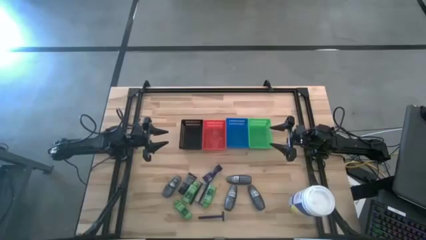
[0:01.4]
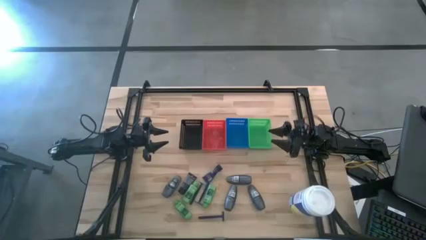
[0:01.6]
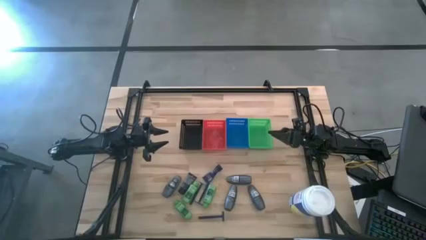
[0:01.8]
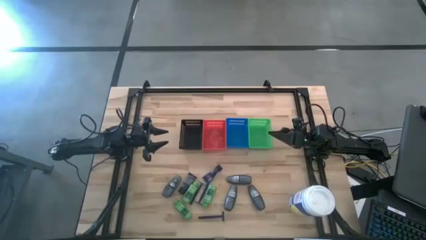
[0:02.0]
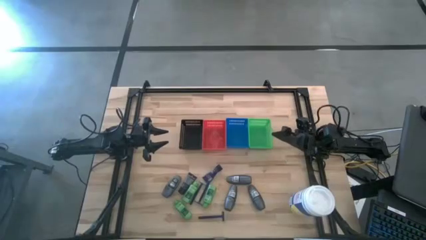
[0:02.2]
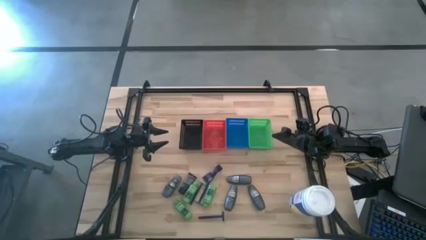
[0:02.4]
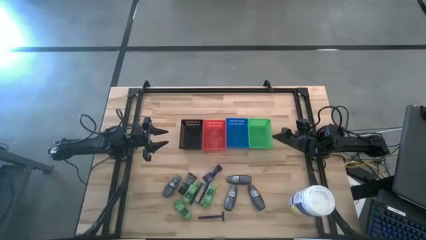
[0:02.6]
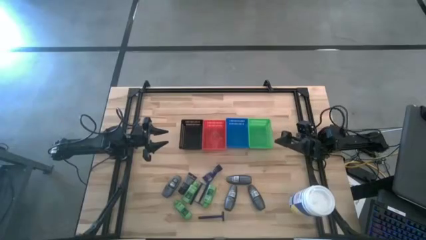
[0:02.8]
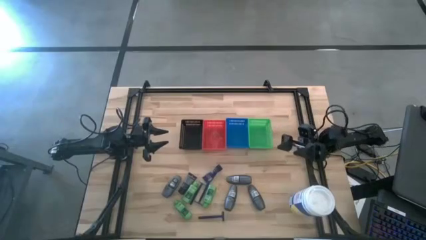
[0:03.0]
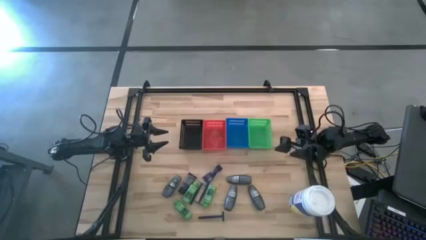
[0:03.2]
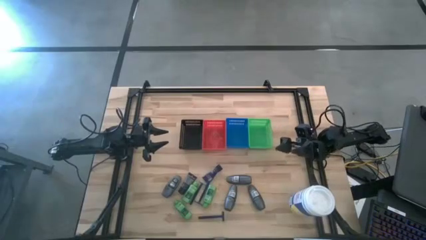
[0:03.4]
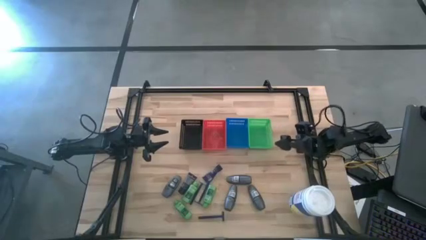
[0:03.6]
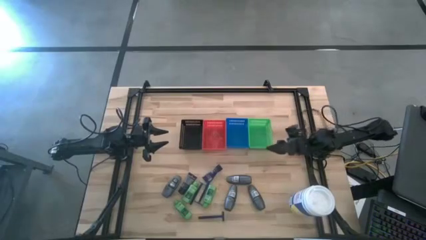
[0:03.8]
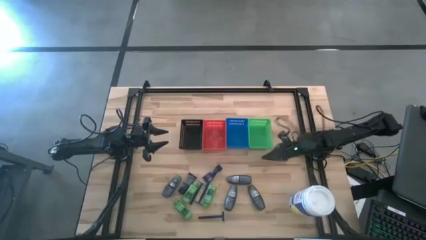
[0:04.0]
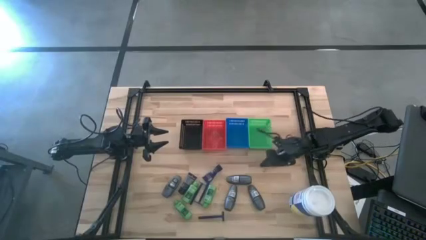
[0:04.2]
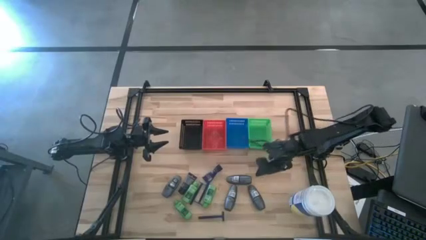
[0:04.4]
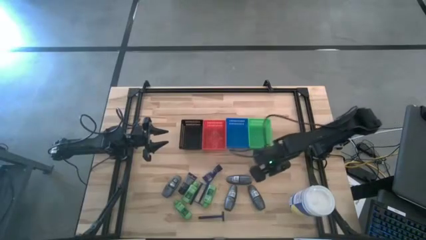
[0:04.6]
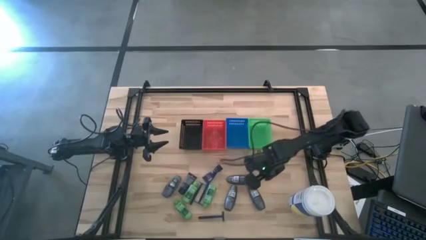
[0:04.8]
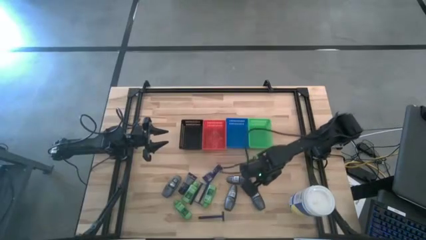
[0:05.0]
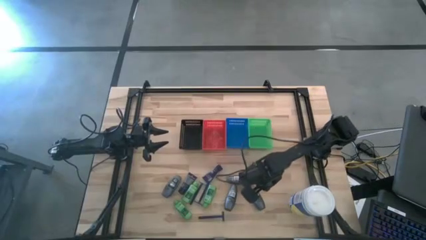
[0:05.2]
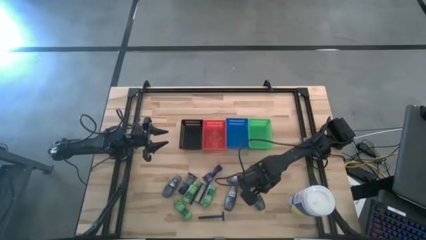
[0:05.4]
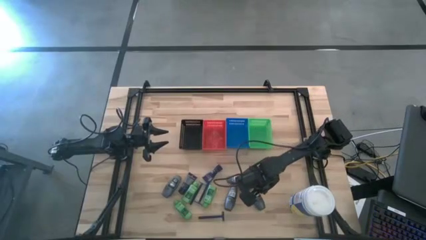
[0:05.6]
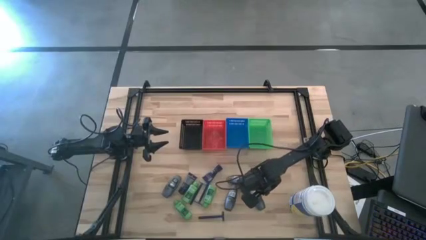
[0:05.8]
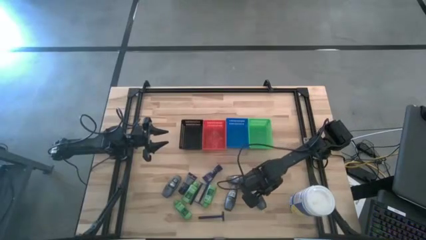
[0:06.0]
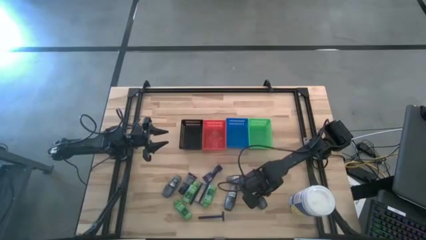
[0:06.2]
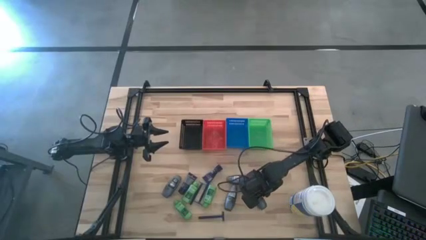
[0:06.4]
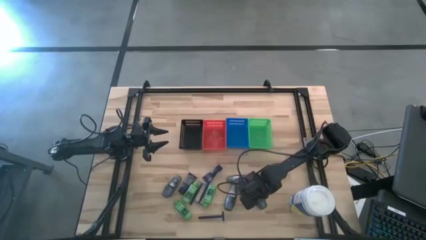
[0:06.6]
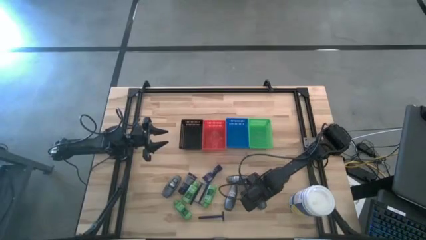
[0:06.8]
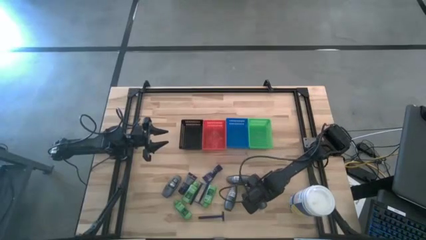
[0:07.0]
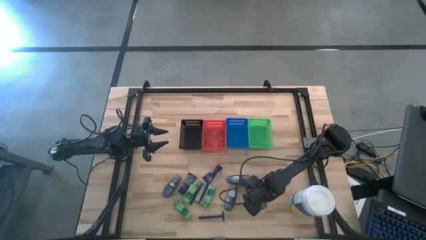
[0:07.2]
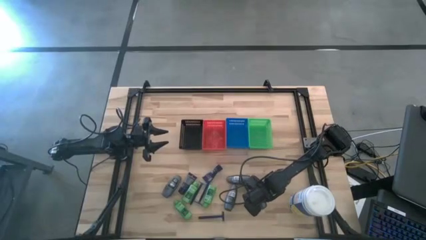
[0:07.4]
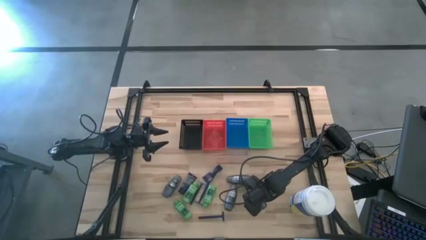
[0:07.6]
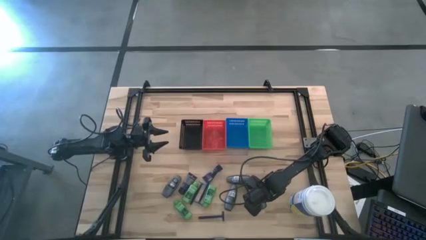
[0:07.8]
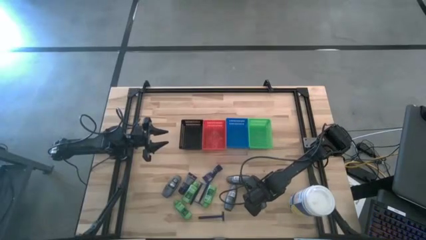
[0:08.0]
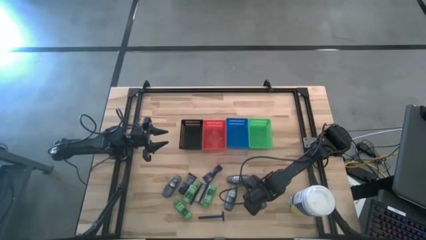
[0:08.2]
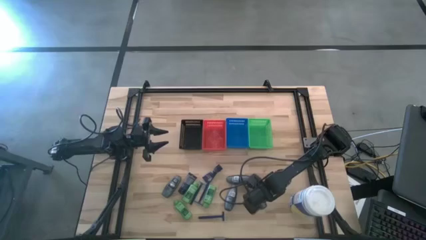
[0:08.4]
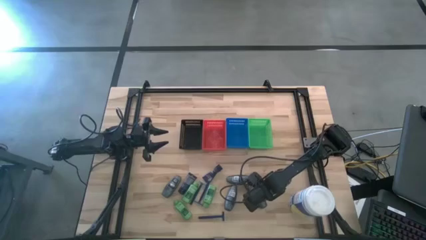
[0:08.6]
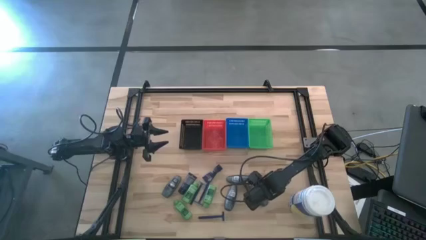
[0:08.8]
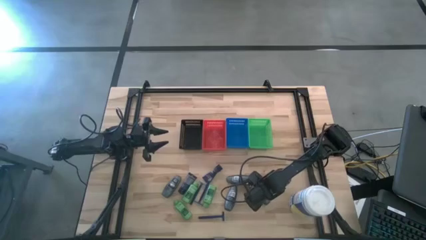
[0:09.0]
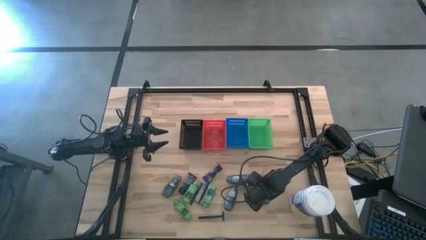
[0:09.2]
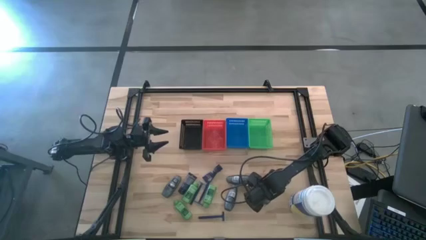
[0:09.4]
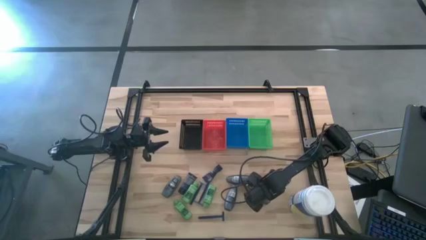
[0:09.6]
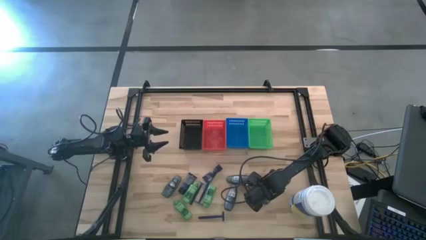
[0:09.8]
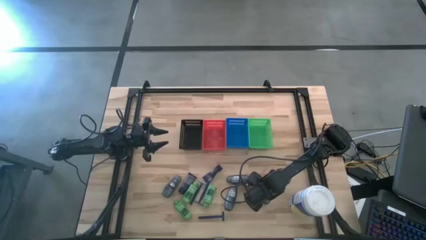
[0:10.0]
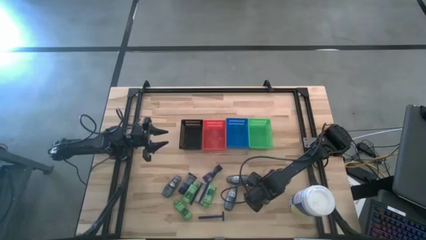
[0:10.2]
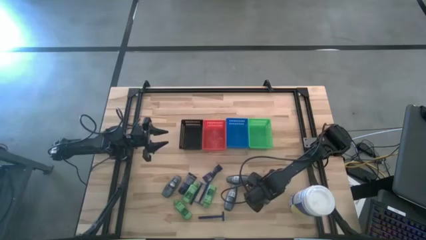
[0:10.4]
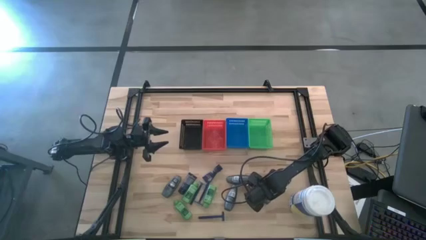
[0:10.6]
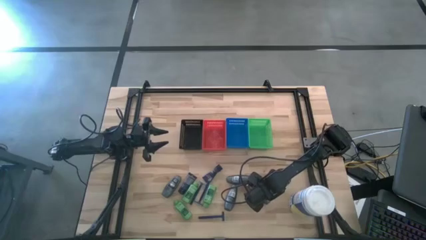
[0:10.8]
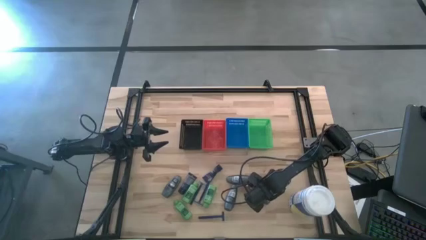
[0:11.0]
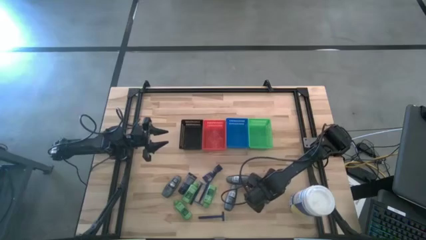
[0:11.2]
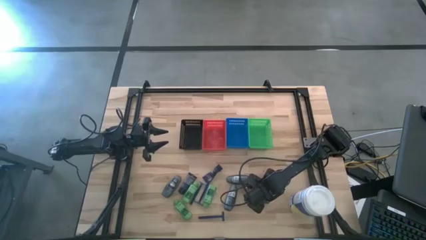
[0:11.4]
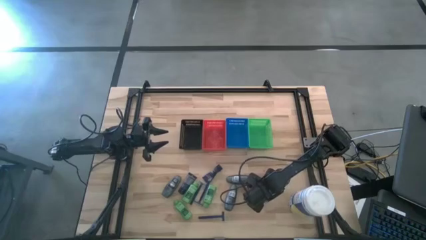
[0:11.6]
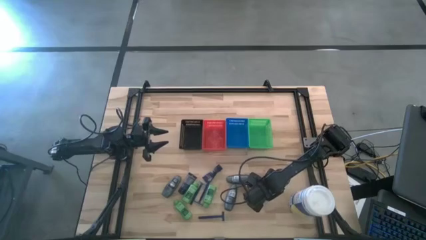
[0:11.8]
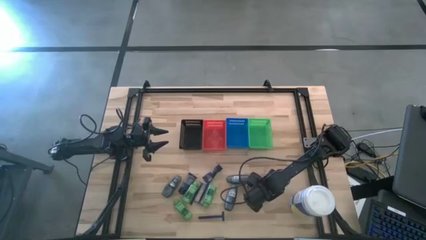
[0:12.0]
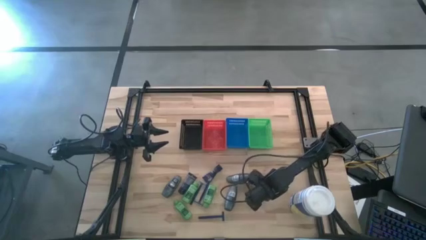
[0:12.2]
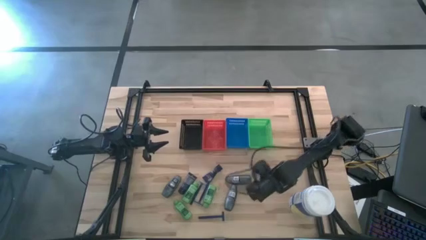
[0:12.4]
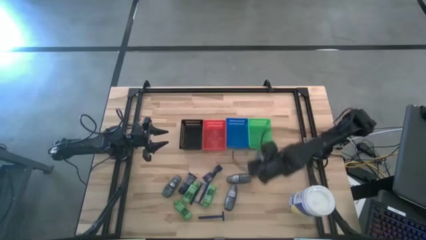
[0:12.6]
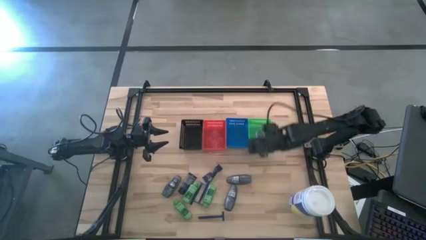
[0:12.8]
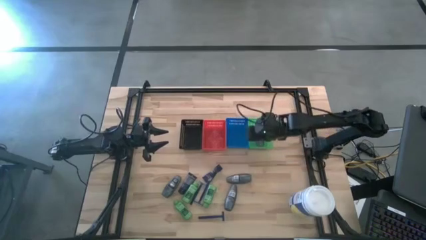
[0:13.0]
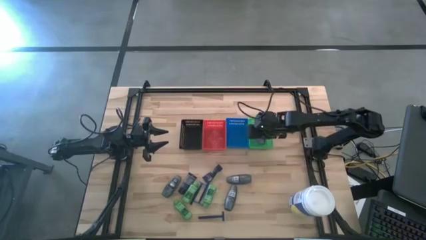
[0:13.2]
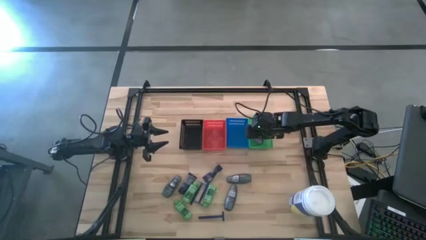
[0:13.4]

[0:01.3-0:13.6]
Task: Pick & Place Travel size toiletries
Put the black deodorant into the green basket

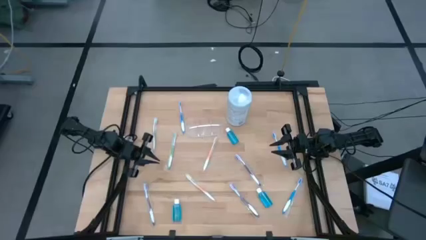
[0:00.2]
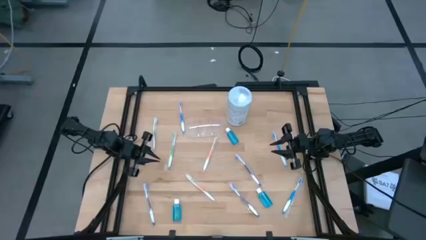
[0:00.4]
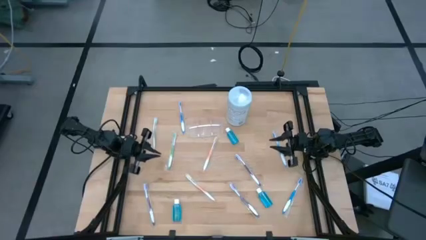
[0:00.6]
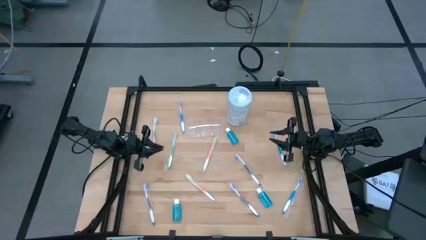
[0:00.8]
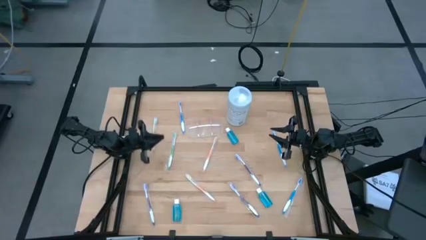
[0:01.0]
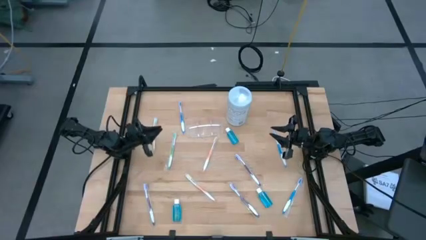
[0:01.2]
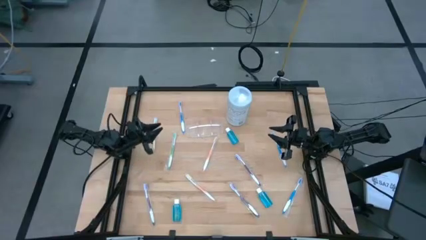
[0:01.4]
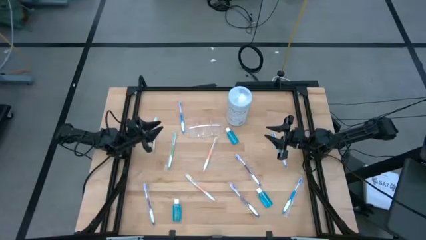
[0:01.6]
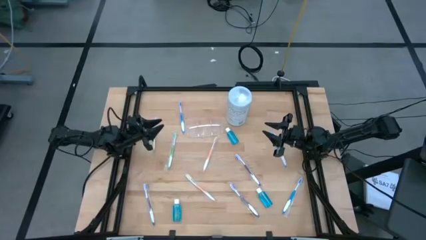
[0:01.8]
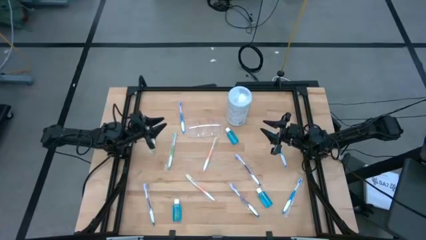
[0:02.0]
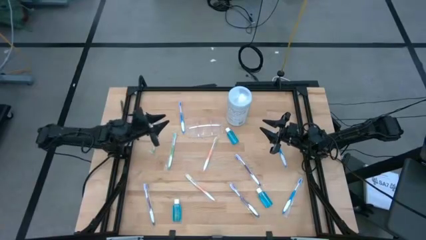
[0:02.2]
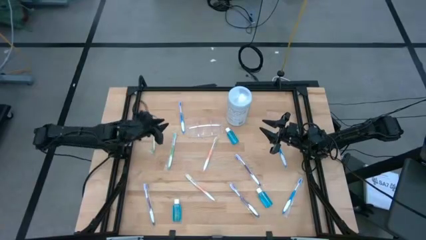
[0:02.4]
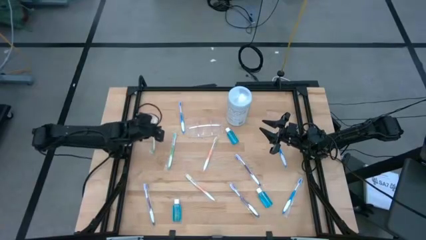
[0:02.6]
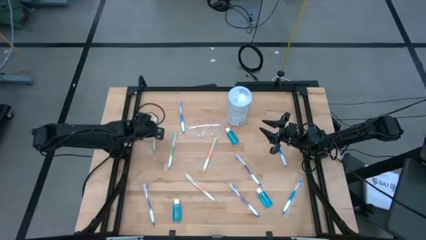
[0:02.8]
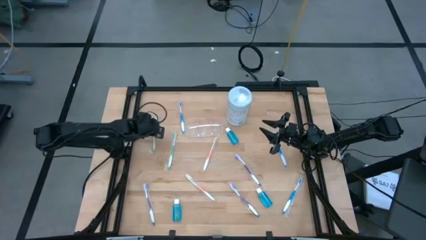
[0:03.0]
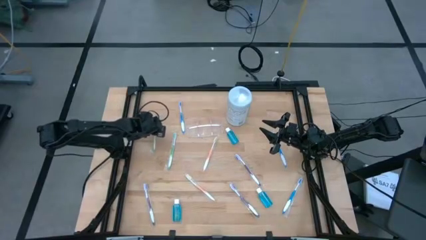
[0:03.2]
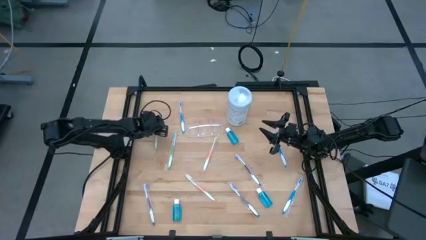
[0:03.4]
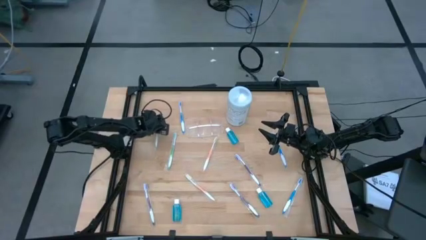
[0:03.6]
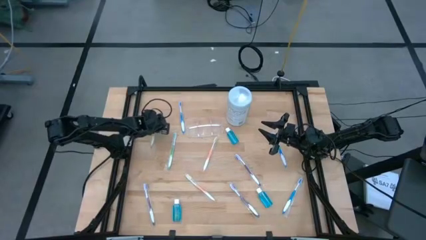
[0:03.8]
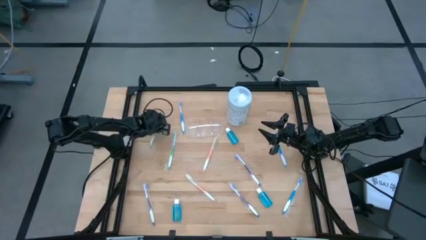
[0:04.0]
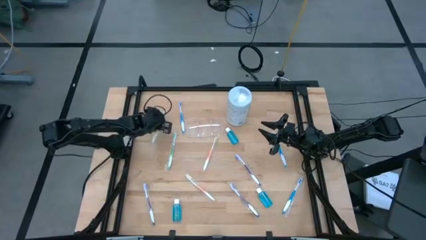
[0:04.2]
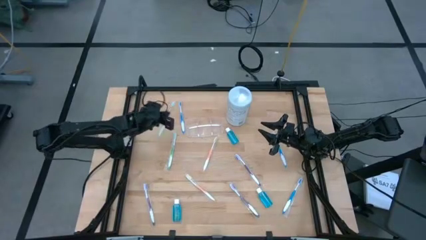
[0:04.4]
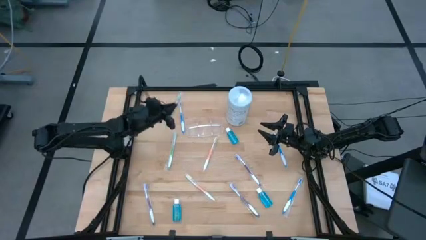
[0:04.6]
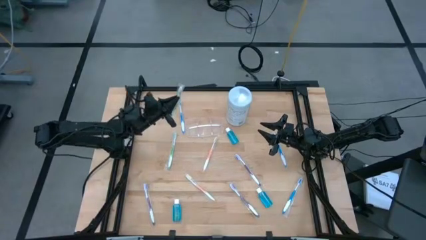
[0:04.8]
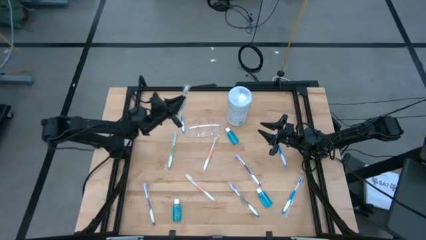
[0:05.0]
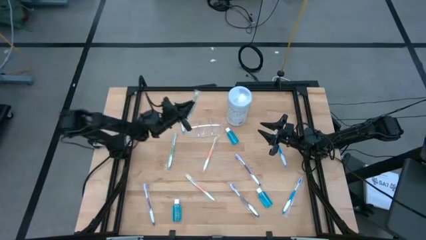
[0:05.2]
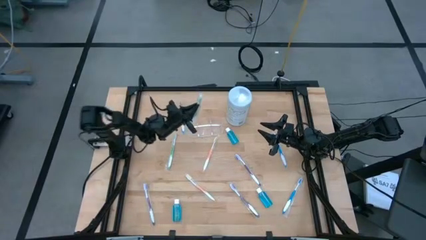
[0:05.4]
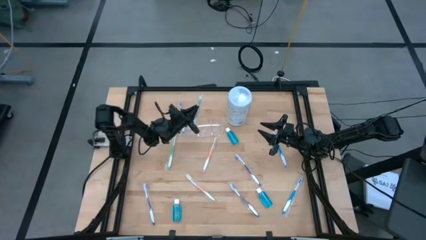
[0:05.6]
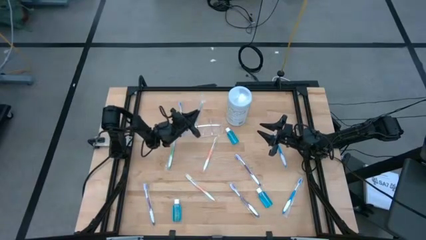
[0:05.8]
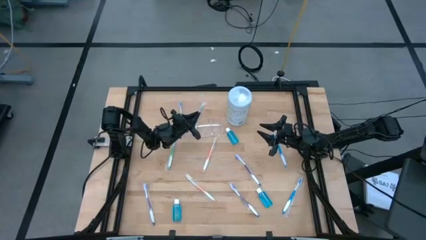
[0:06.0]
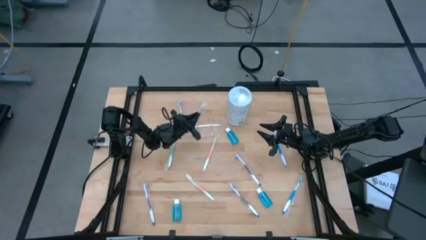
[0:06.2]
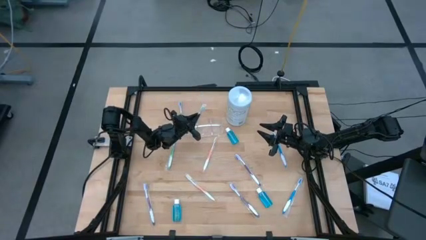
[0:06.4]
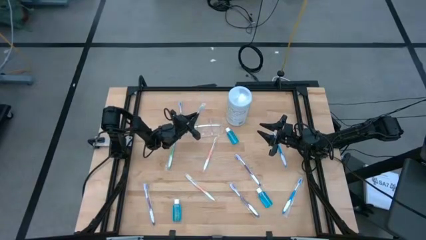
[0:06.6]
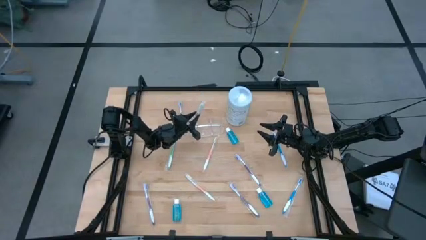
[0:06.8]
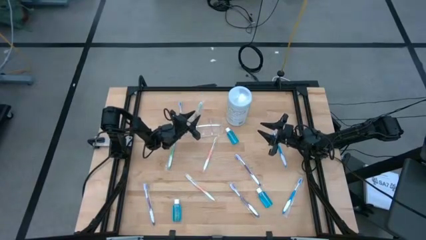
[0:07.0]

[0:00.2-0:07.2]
Task: Pick & Place toothbrushing station
Put the left green toothbrush into the transparent organizer
